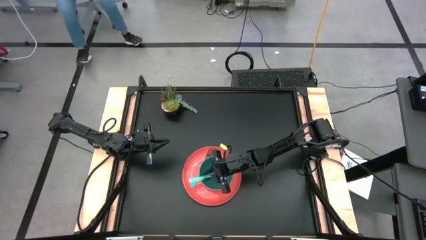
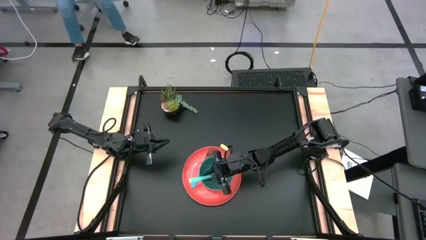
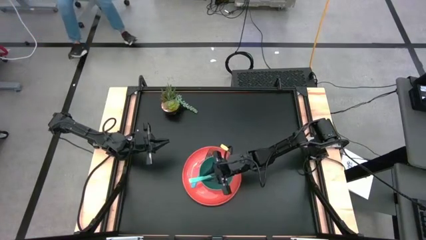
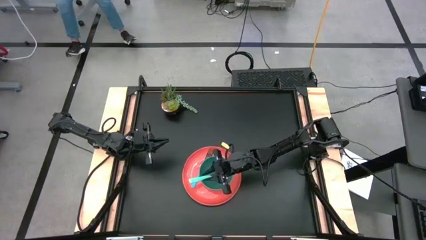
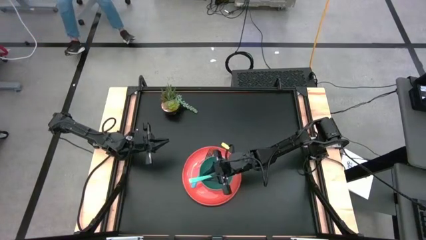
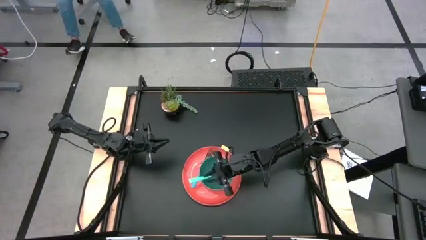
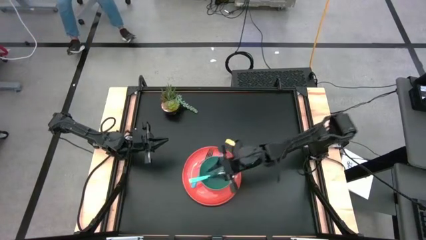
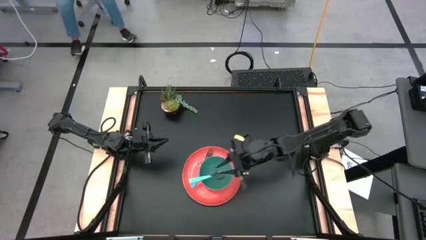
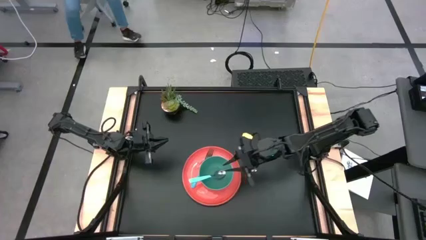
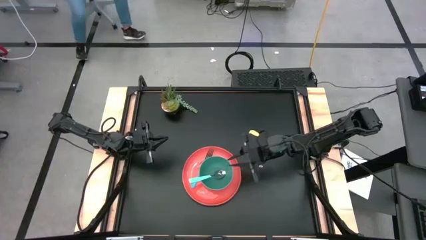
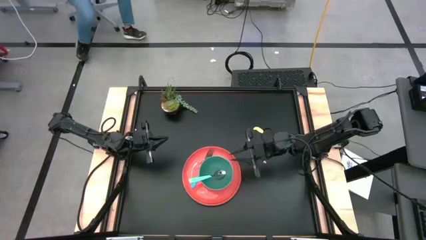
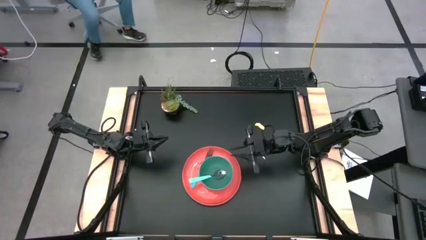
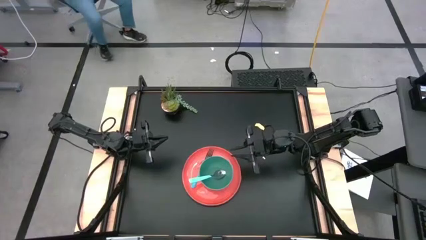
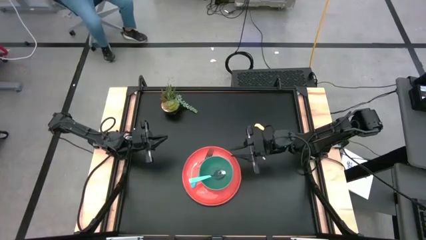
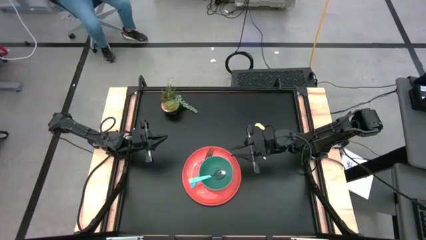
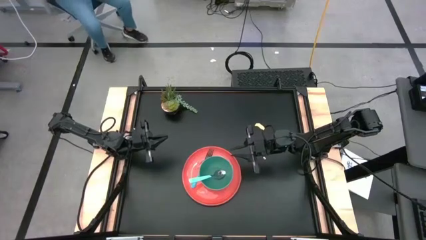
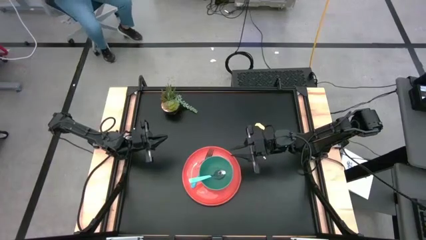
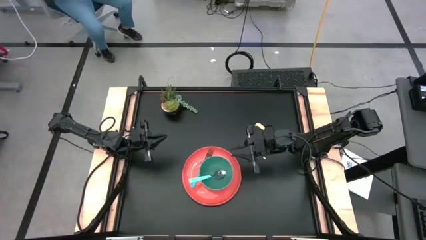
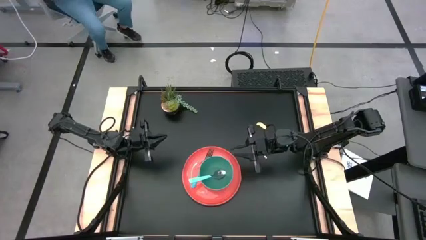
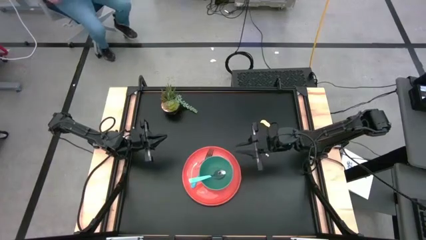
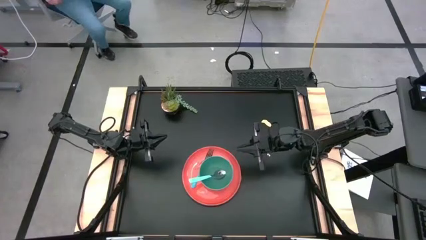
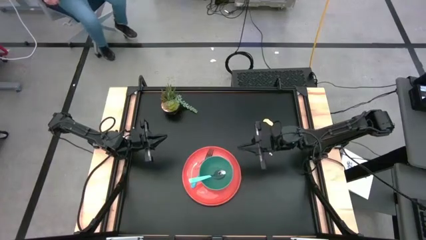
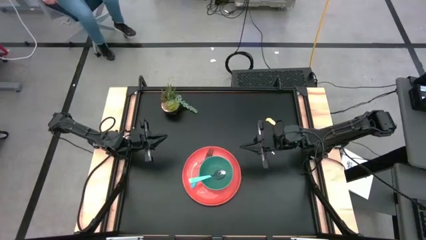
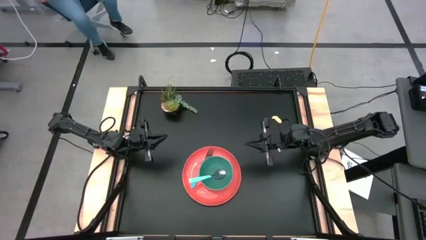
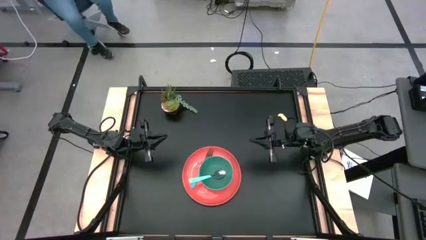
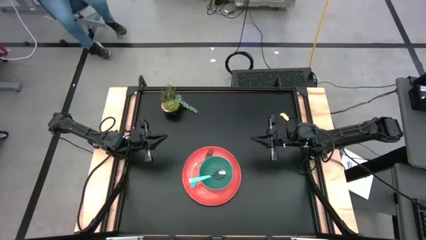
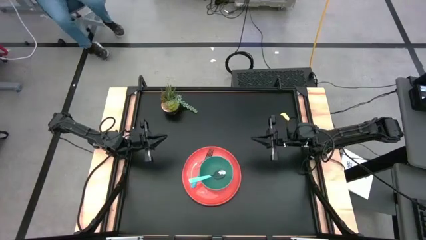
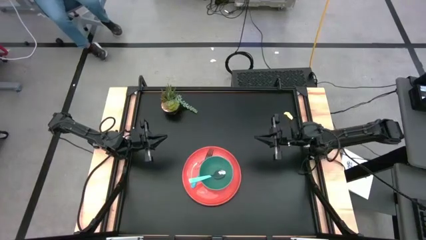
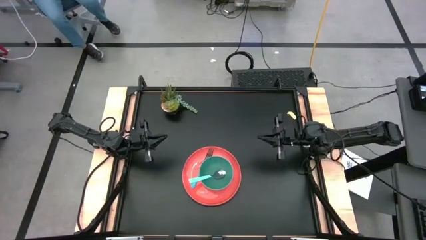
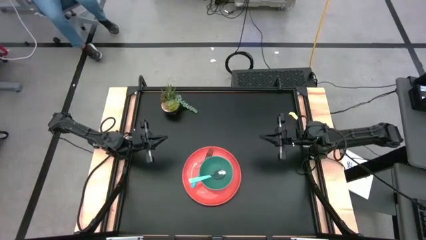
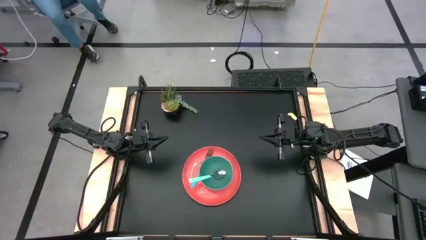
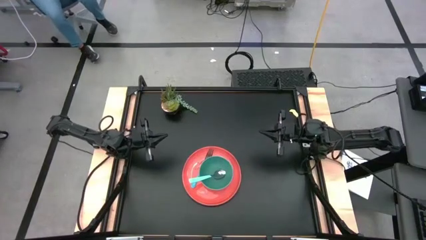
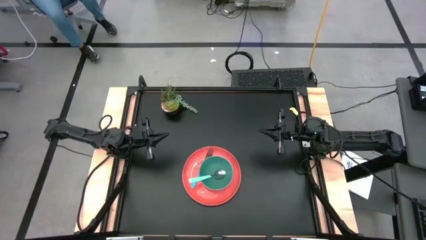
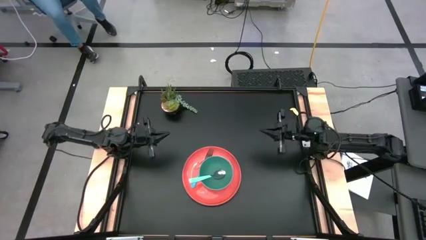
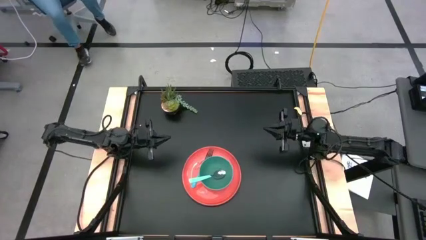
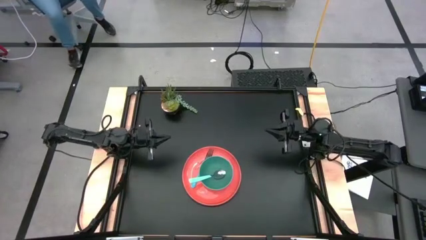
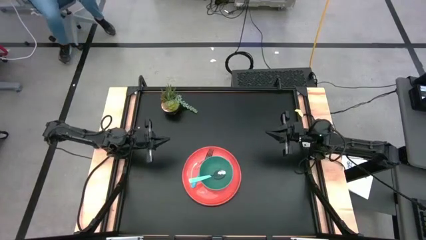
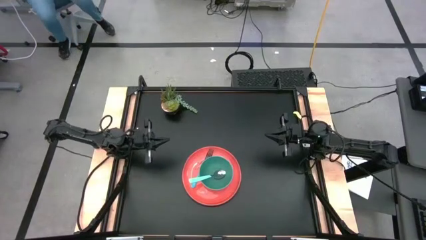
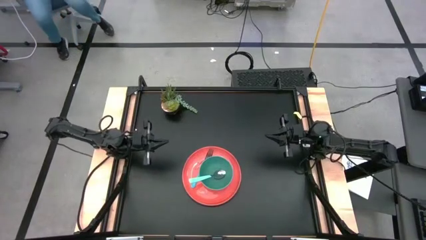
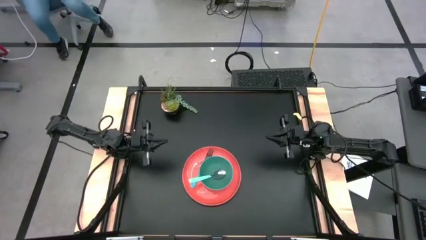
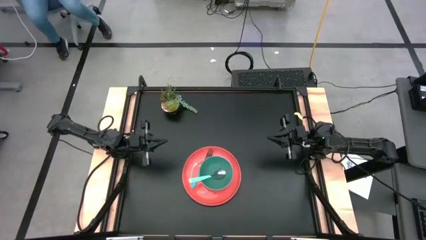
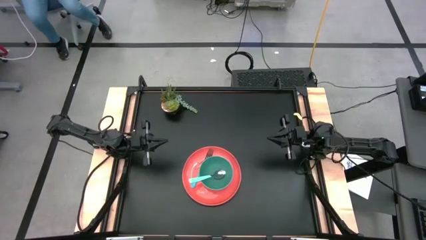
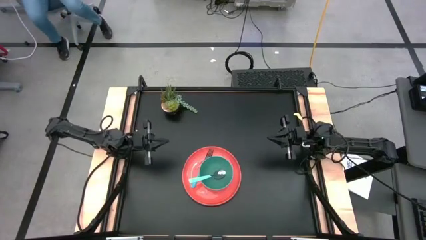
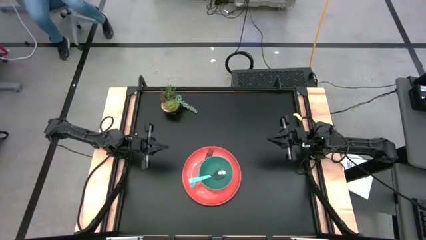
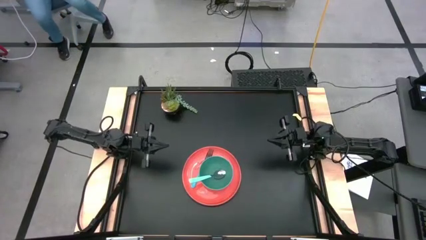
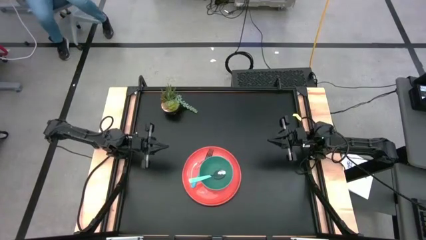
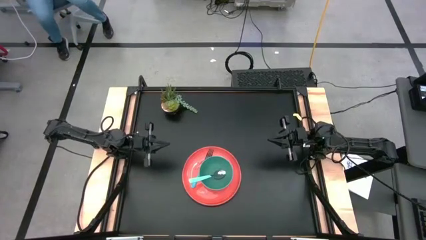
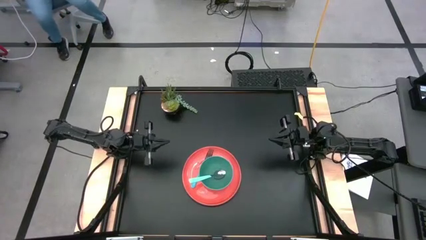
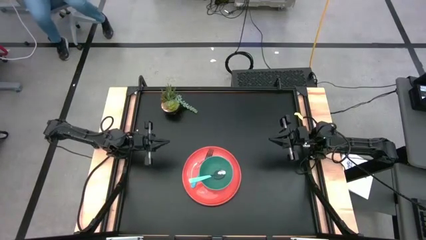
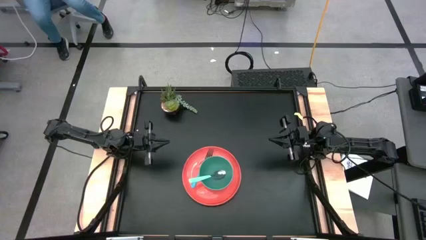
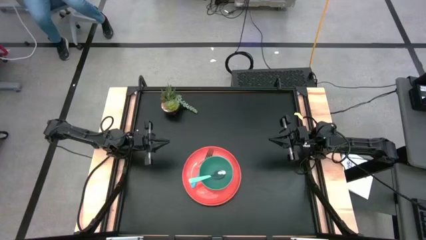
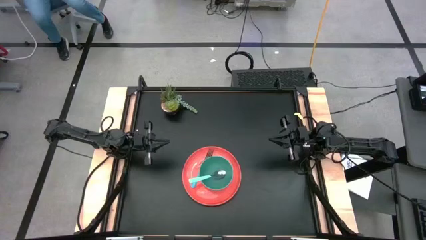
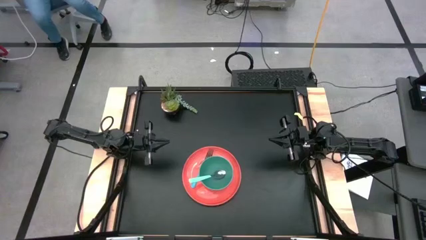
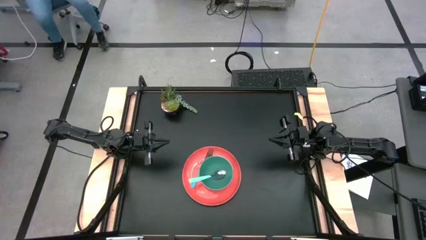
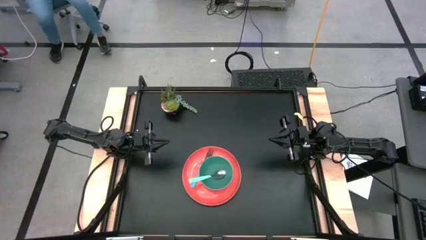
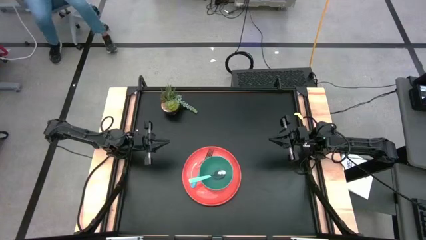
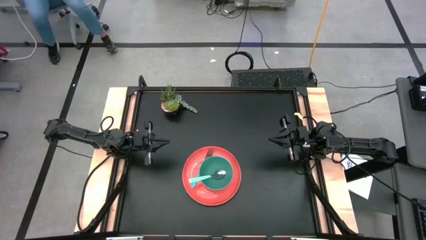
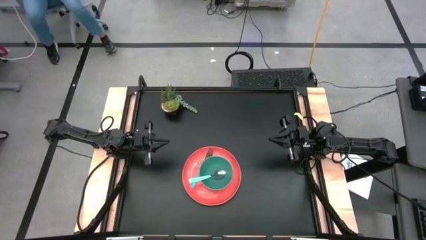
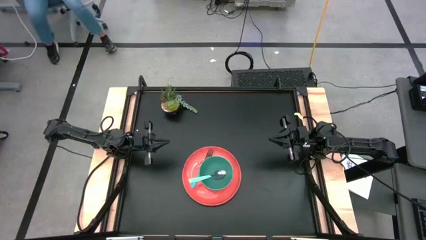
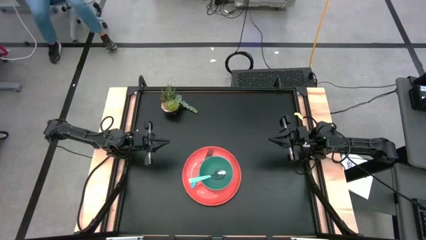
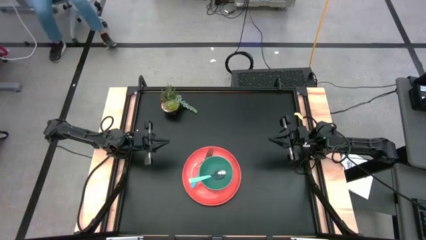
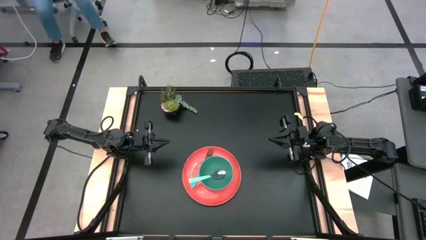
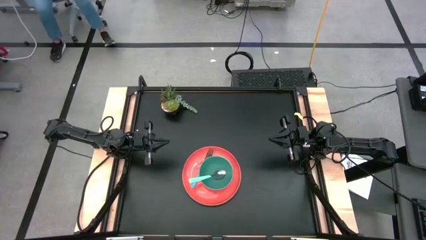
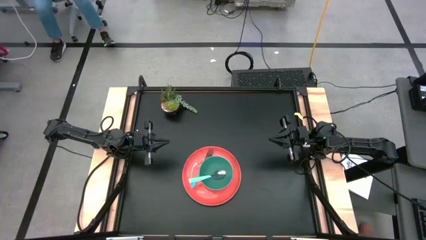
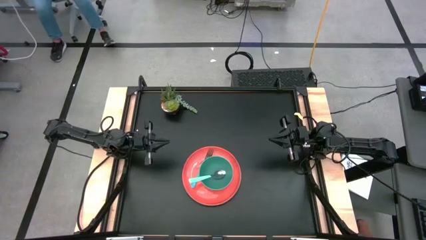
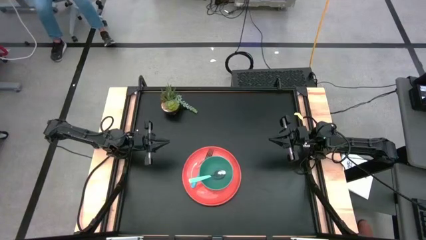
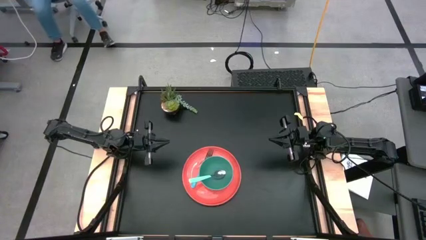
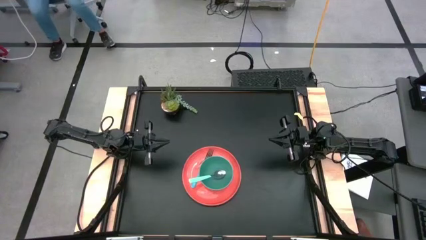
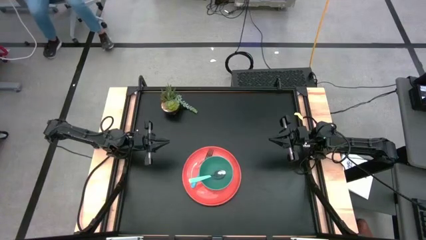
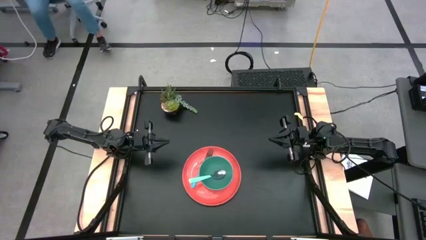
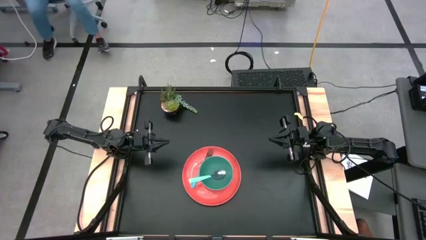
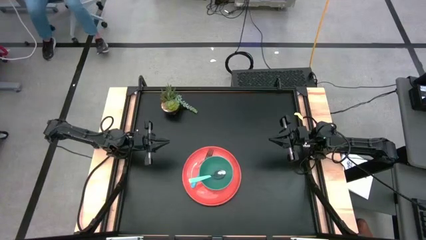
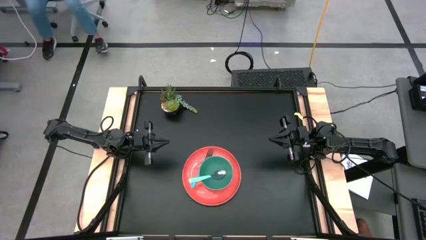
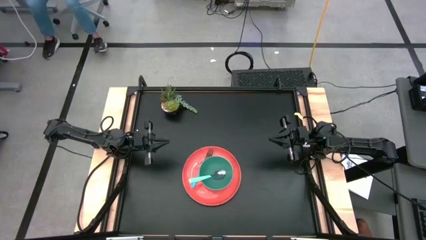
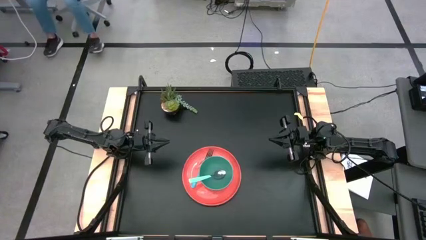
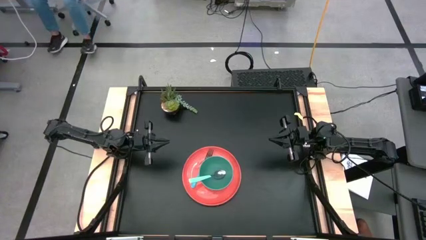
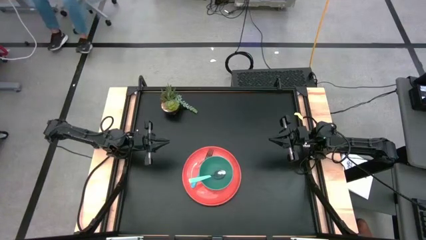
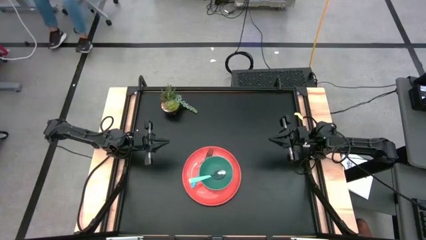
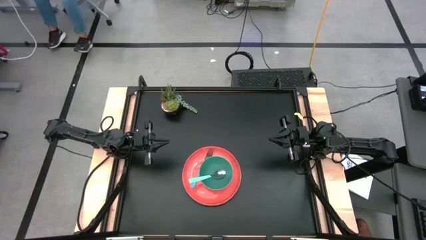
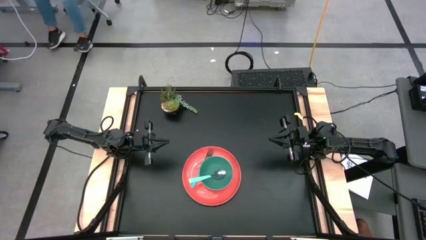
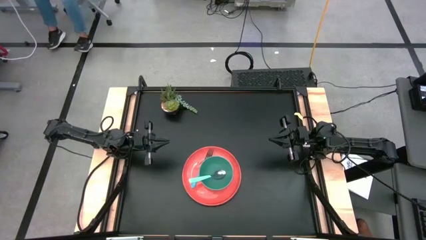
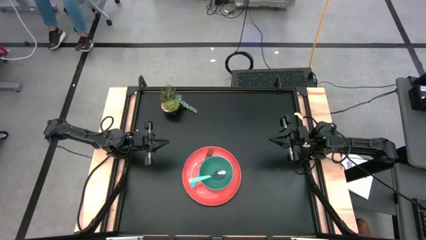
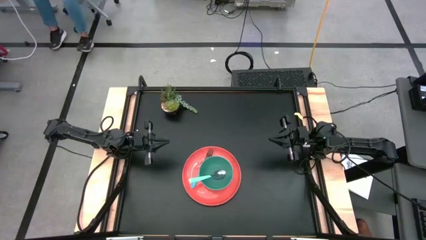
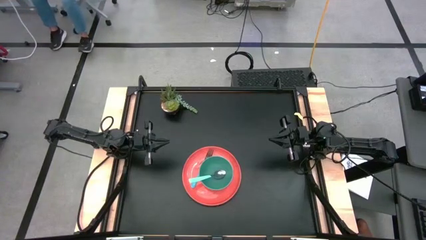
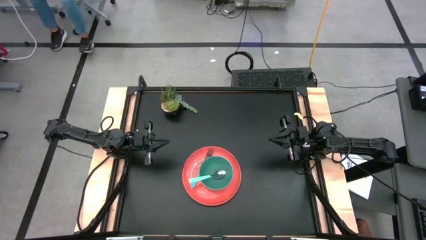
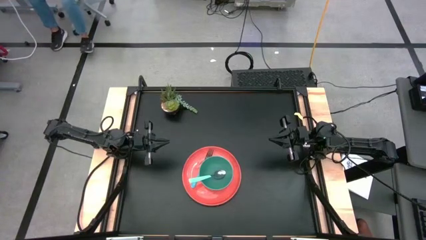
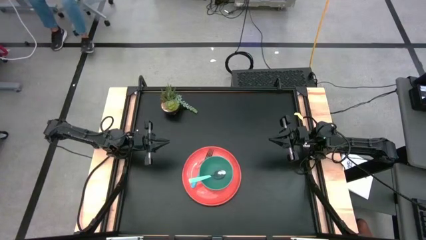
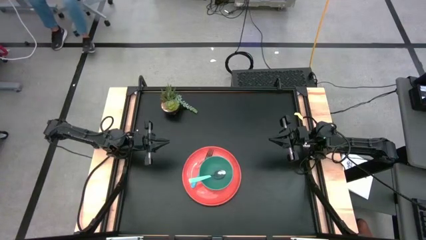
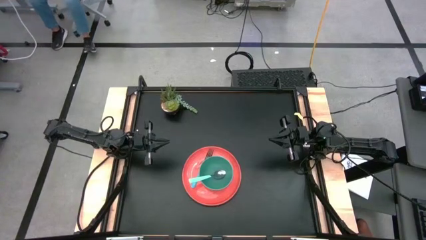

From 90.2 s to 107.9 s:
Task: Set table place
Return to Home Position
